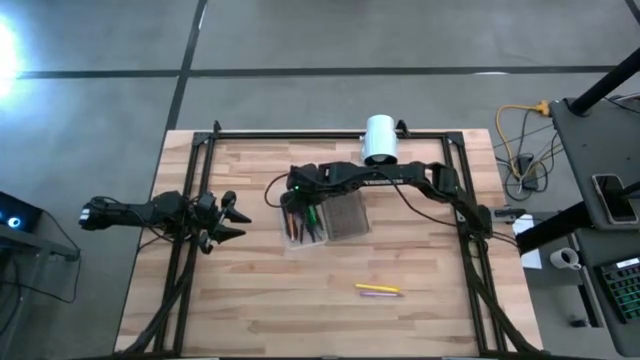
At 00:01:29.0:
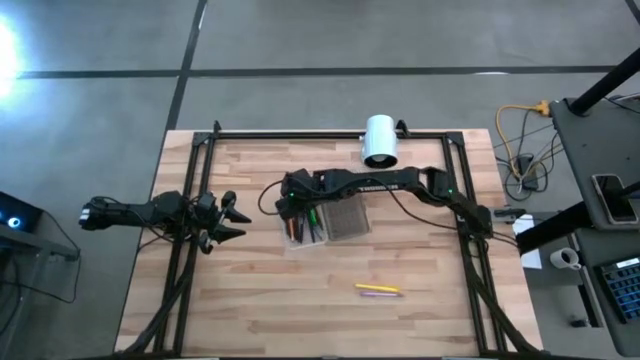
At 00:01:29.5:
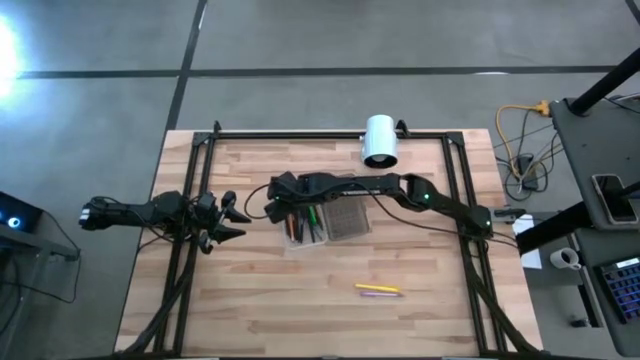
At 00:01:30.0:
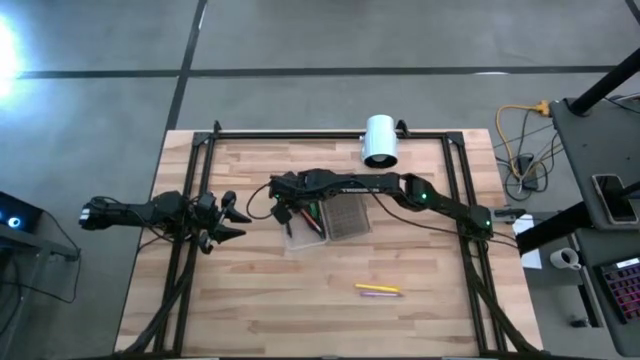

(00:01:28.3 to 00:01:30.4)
Task: Pick & place school supplies into a supply box
Adjust the orange pencil in the black supply box

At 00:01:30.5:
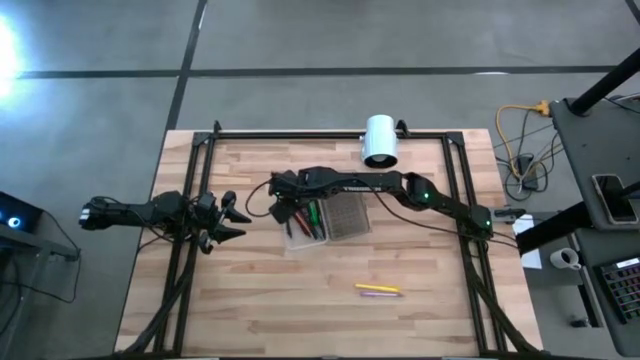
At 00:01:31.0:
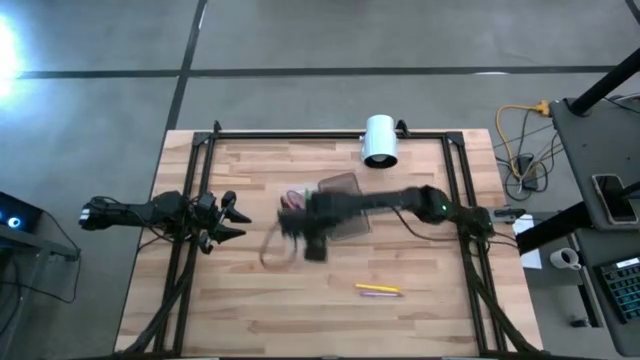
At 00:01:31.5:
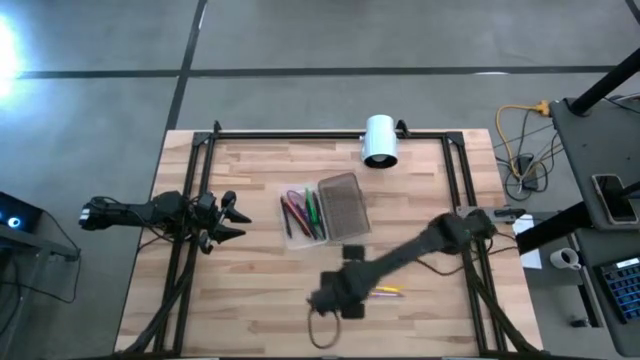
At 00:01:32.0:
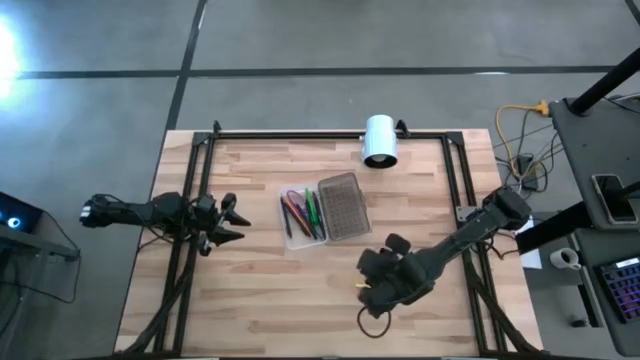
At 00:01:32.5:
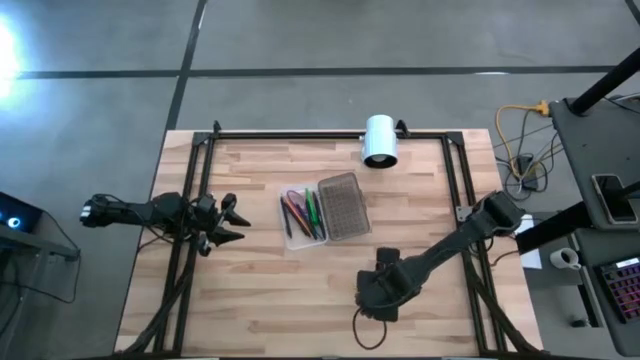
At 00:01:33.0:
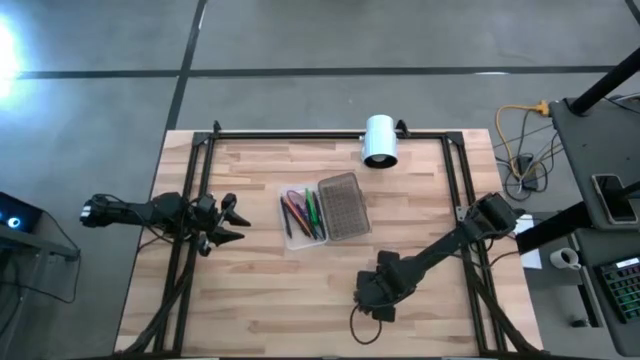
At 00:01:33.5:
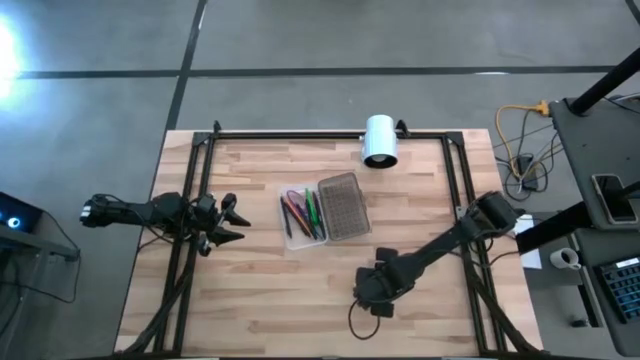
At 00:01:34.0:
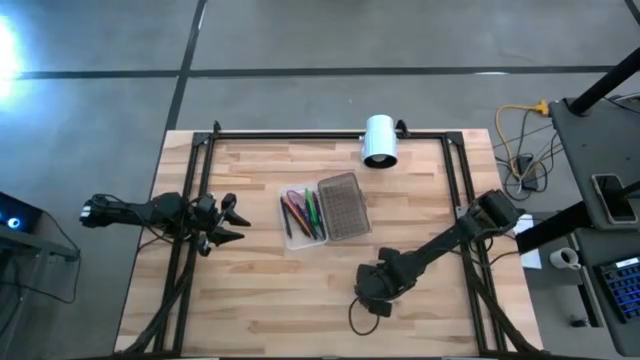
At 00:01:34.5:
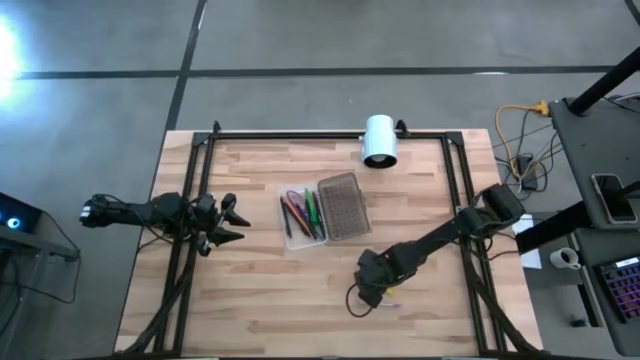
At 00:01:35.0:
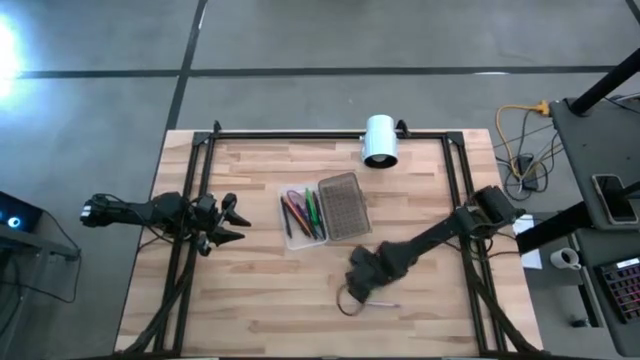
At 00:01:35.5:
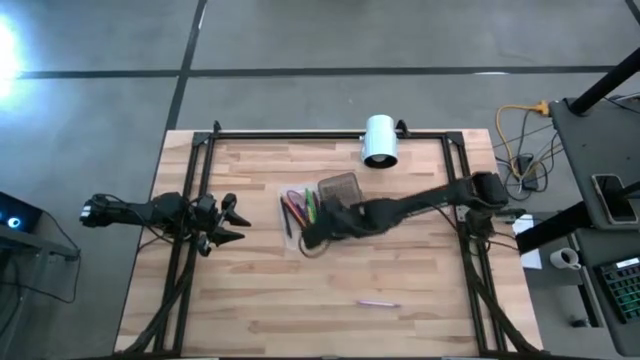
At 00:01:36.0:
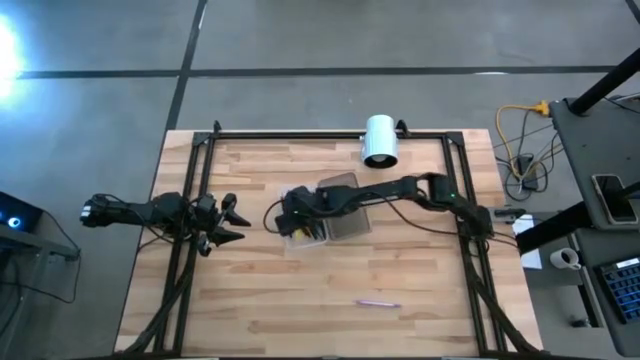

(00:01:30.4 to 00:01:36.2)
Put the yellow highlighter pen into the black supply box

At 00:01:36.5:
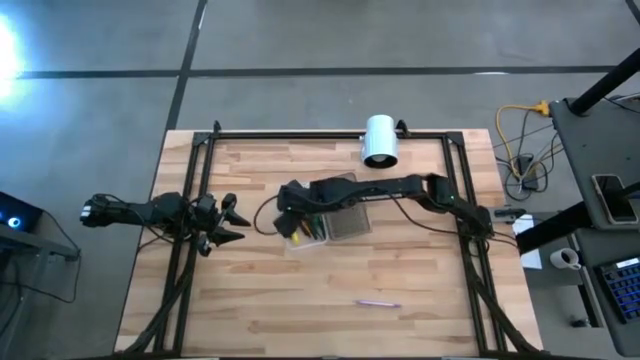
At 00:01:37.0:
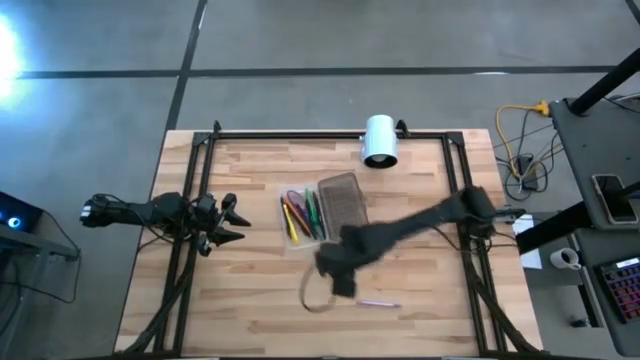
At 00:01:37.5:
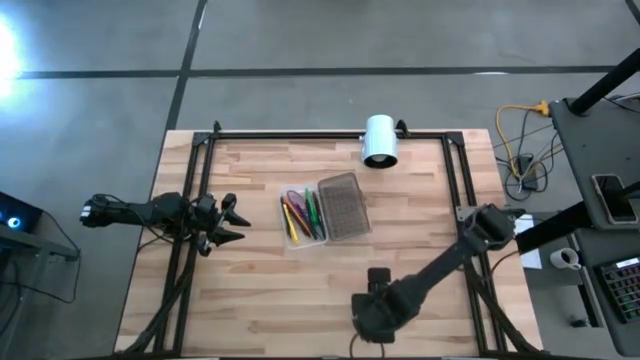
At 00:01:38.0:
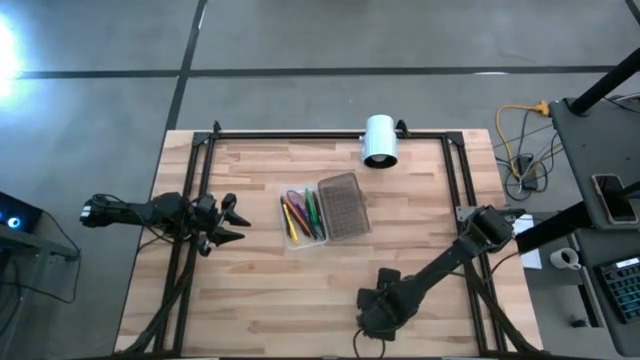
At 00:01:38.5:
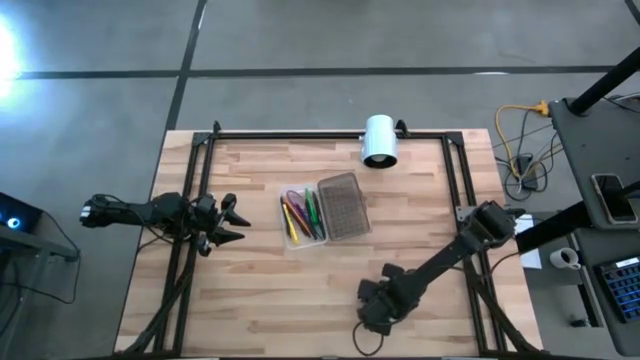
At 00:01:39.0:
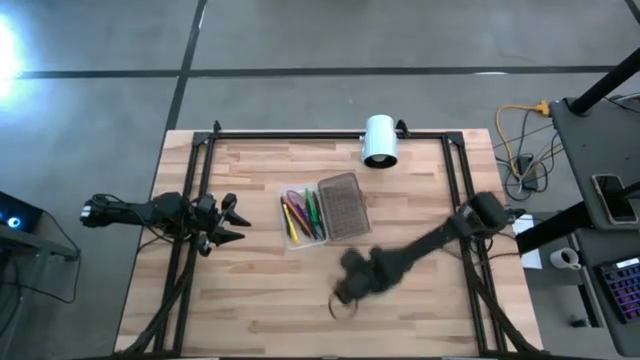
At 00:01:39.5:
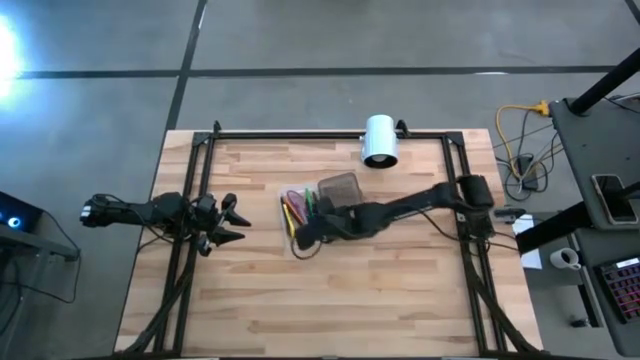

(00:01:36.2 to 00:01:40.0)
Put the purple pen into the black supply box

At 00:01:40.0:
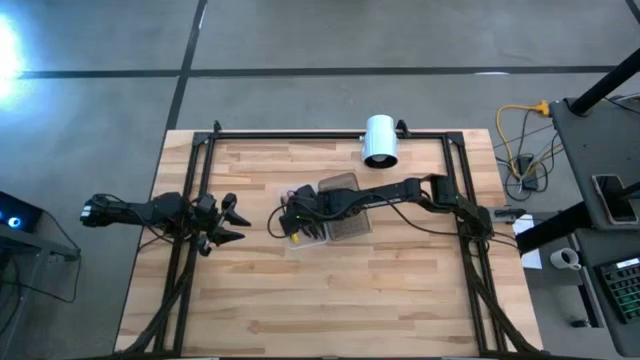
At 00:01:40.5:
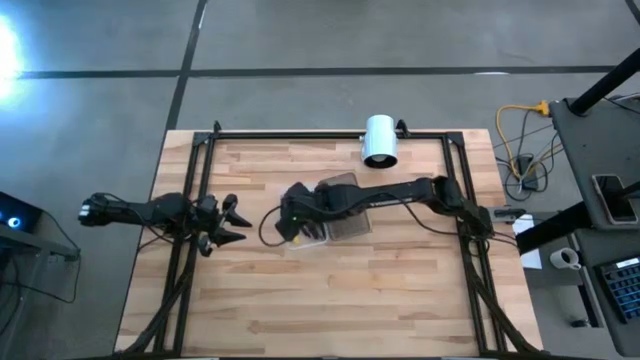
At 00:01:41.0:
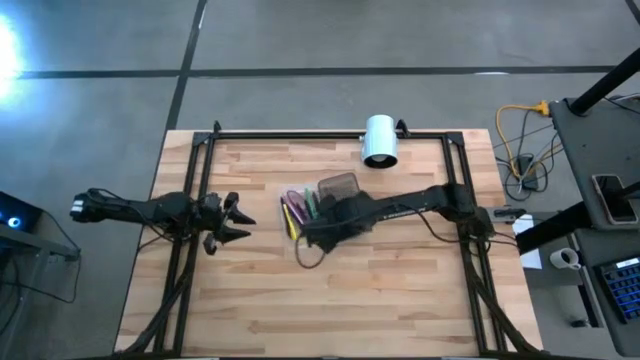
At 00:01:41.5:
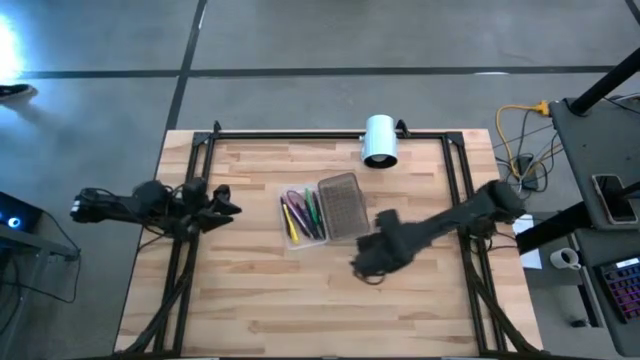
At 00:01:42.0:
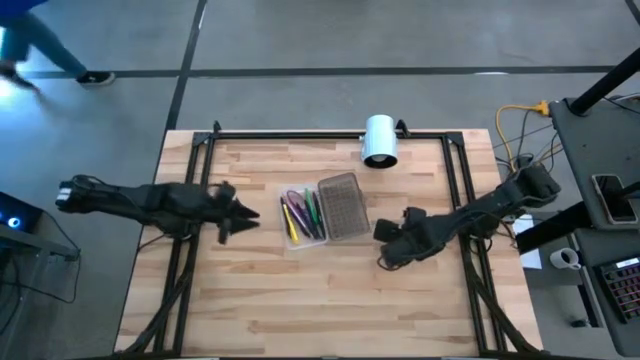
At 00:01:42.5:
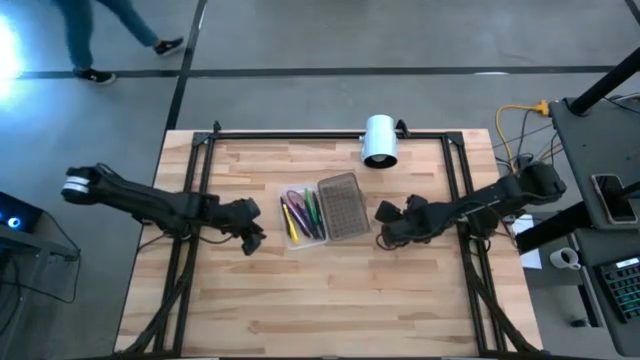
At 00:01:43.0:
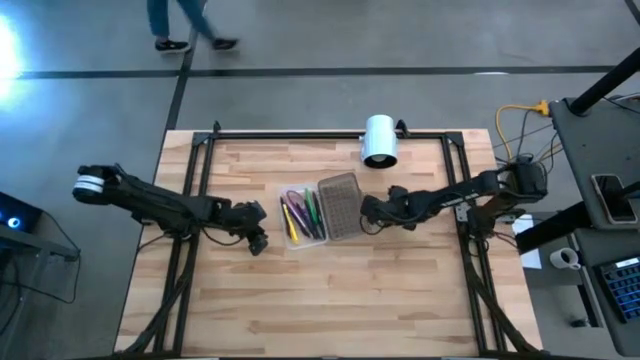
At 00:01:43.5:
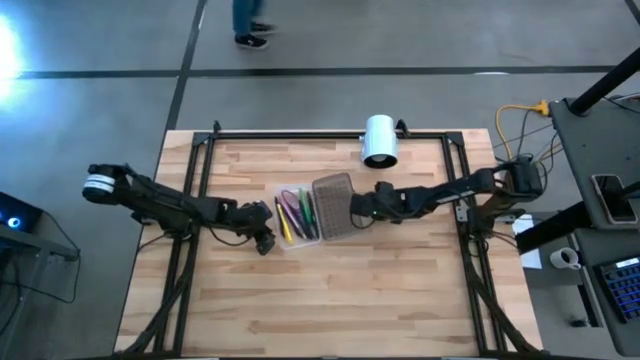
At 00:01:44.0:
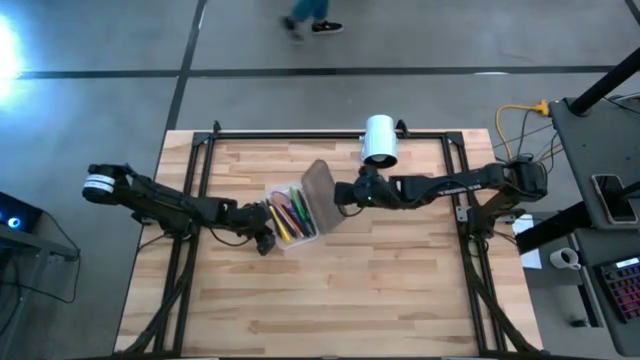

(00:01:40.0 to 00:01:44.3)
Close the black supply box

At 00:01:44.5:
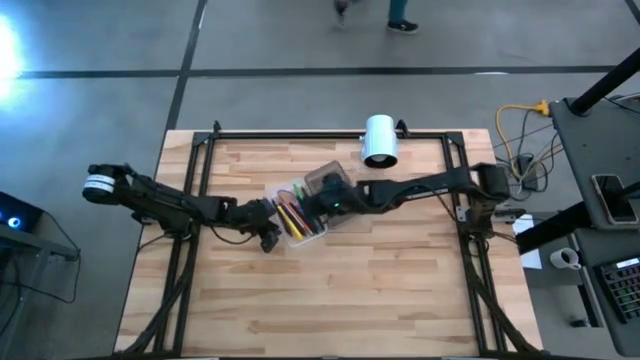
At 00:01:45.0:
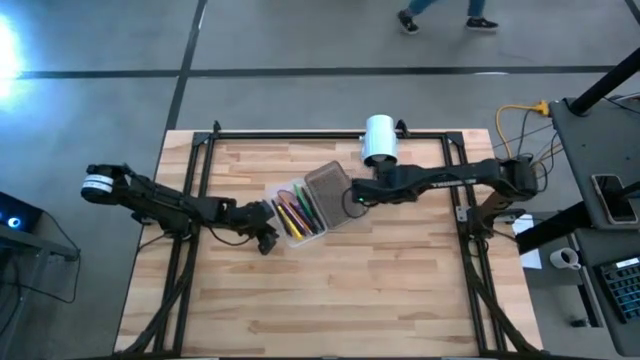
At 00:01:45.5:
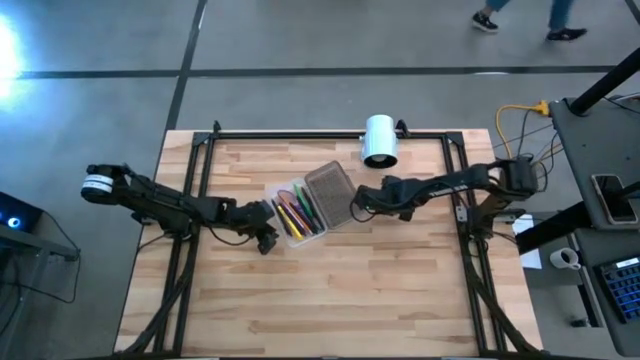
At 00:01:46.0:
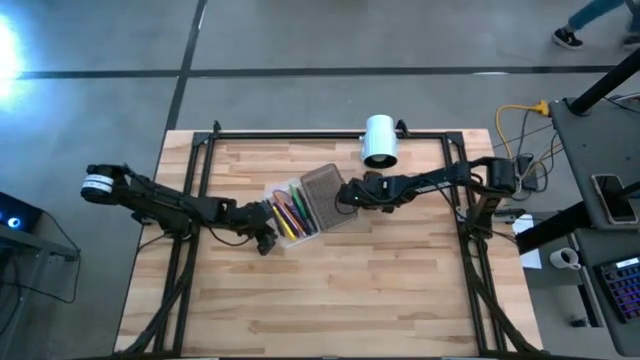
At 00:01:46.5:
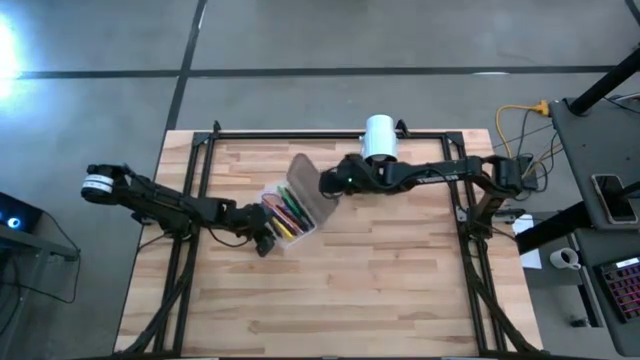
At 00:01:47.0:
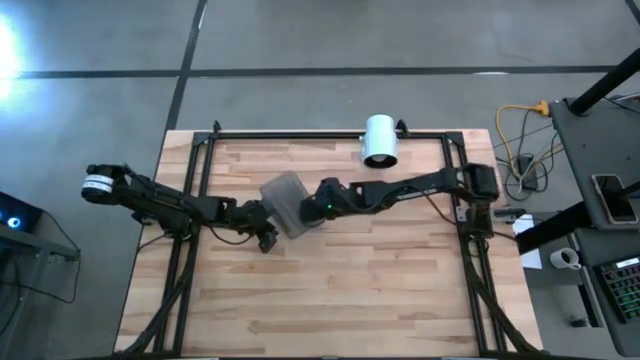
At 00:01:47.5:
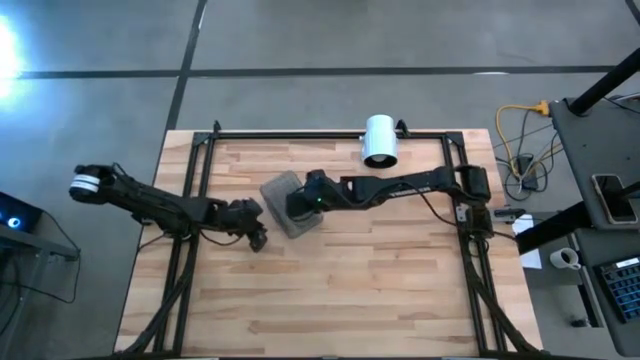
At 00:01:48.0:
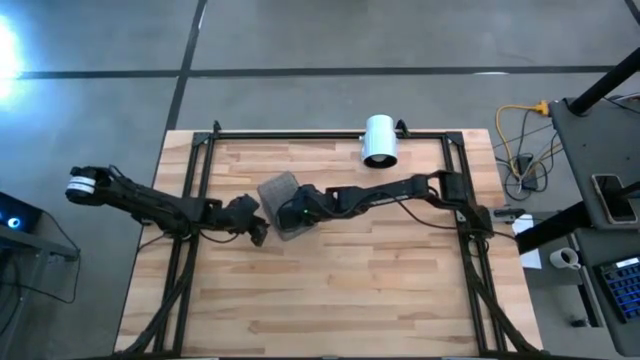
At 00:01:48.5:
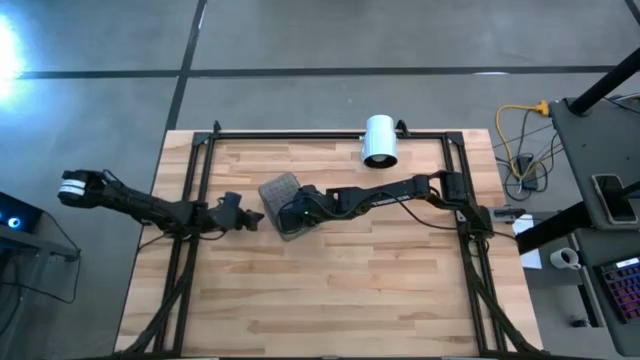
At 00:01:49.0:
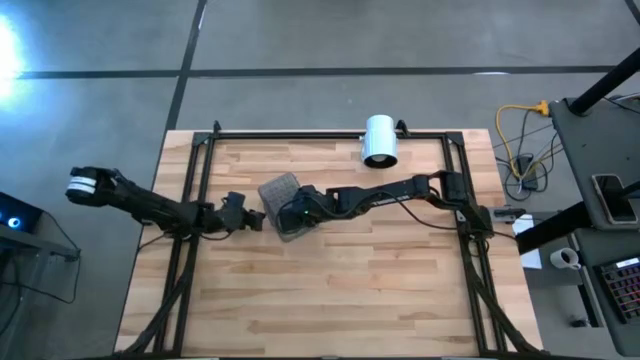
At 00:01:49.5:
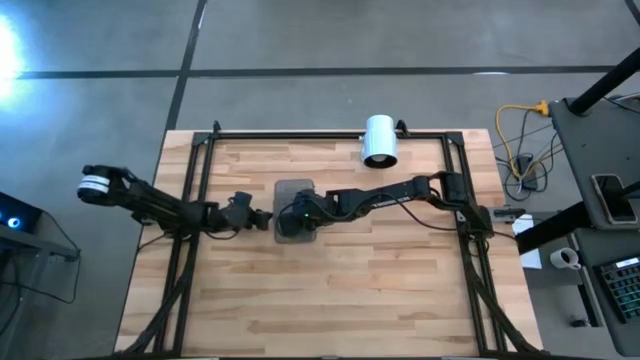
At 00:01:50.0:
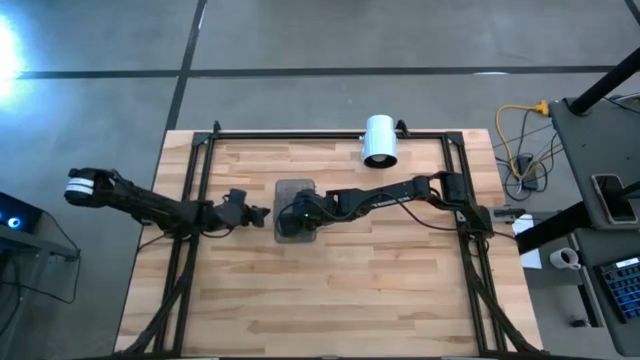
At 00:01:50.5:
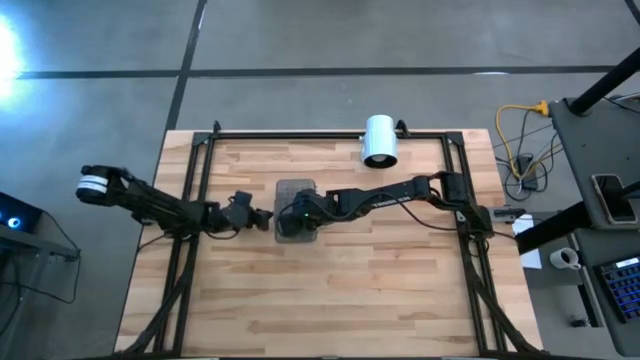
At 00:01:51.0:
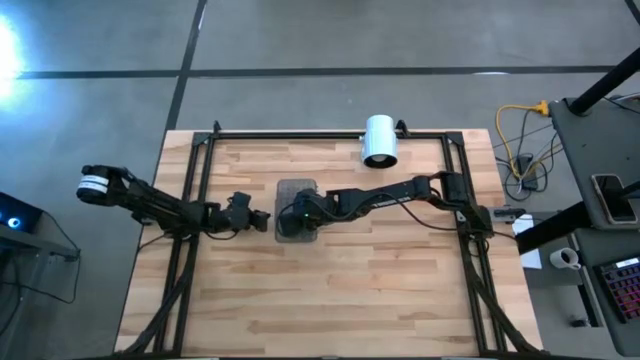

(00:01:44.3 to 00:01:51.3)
Close the black supply box
